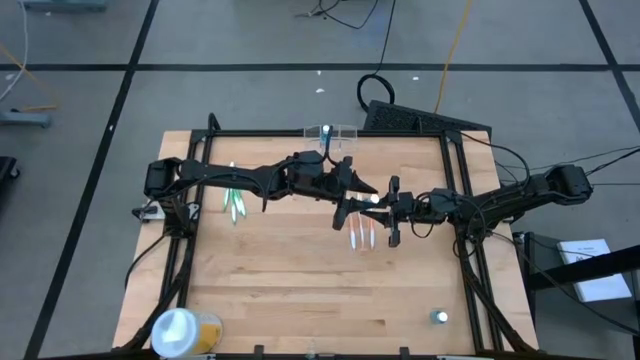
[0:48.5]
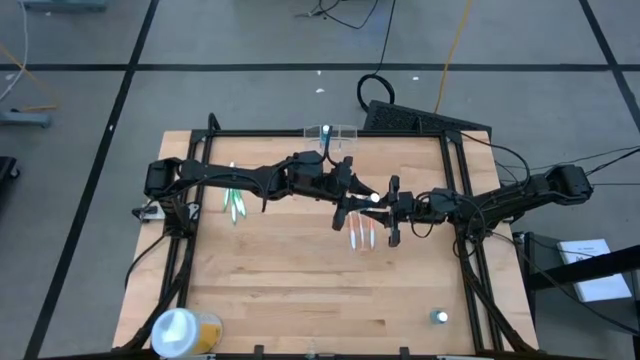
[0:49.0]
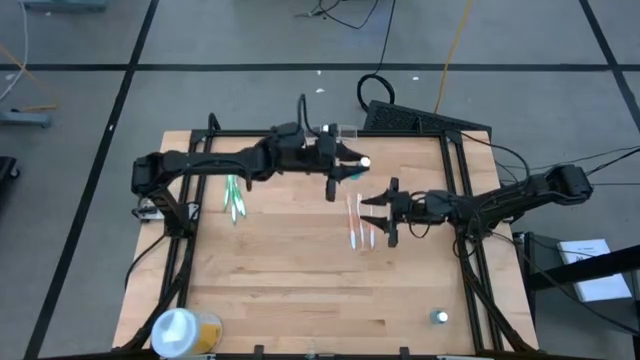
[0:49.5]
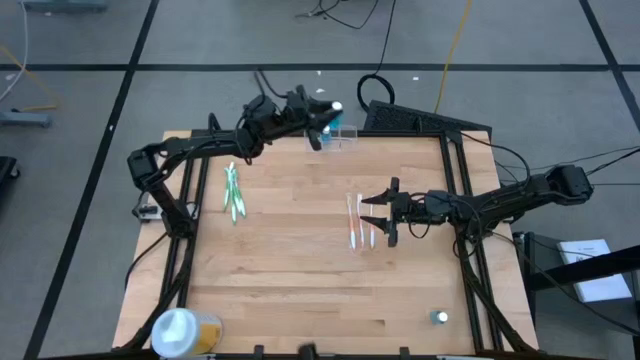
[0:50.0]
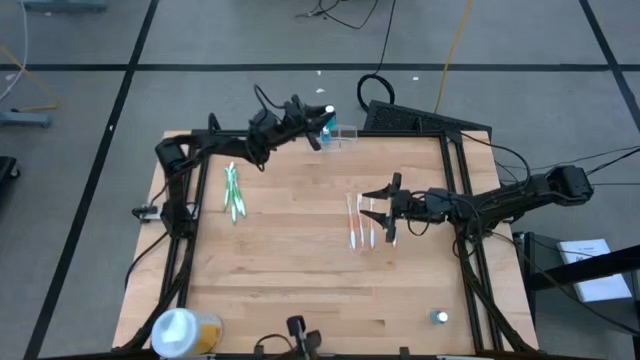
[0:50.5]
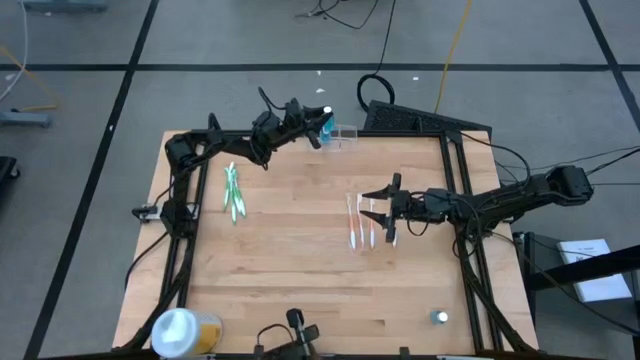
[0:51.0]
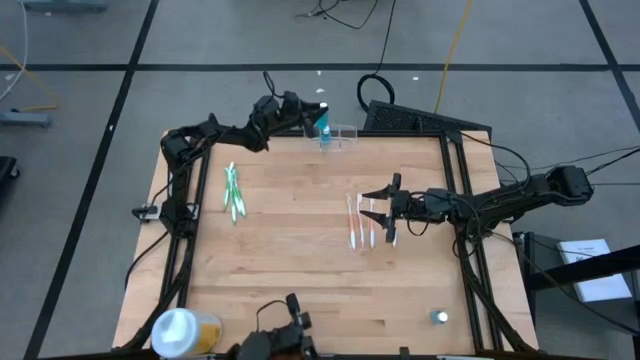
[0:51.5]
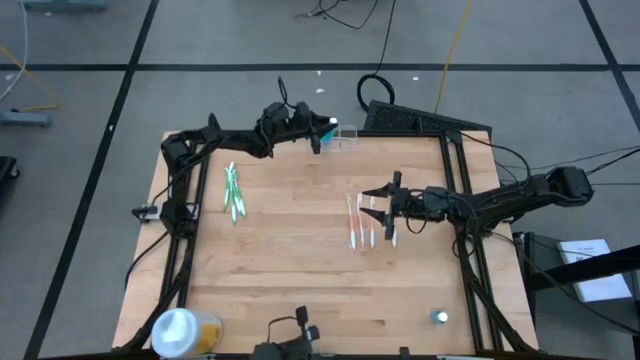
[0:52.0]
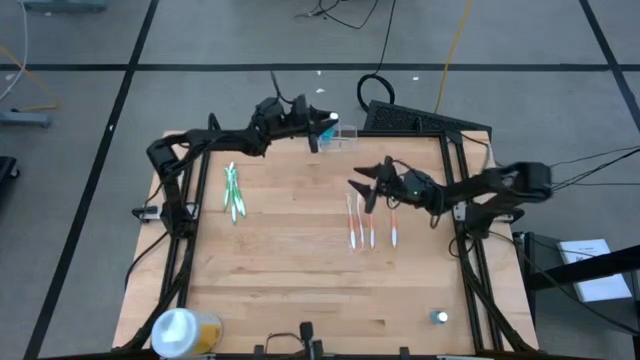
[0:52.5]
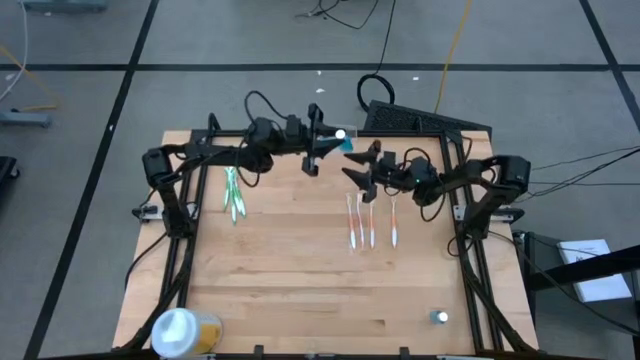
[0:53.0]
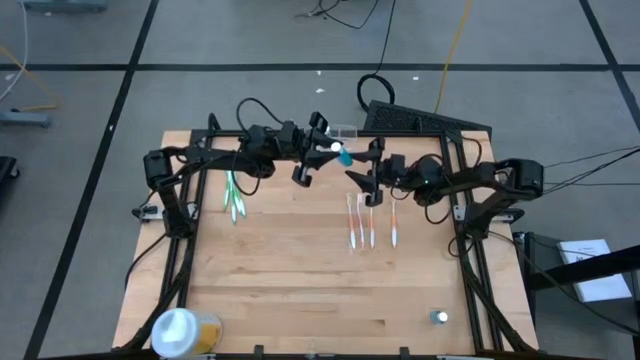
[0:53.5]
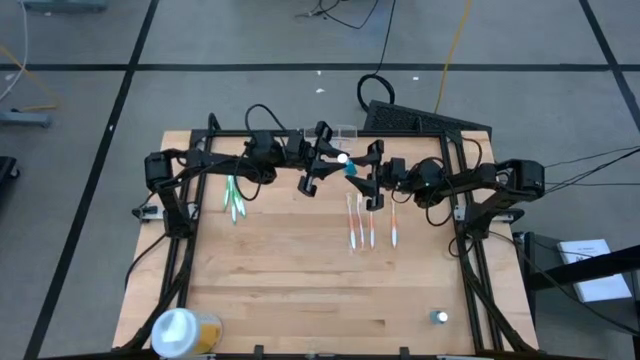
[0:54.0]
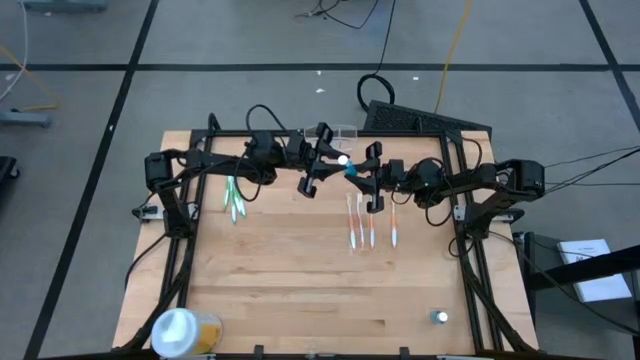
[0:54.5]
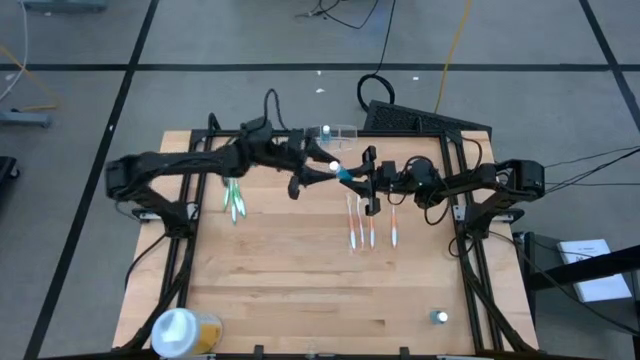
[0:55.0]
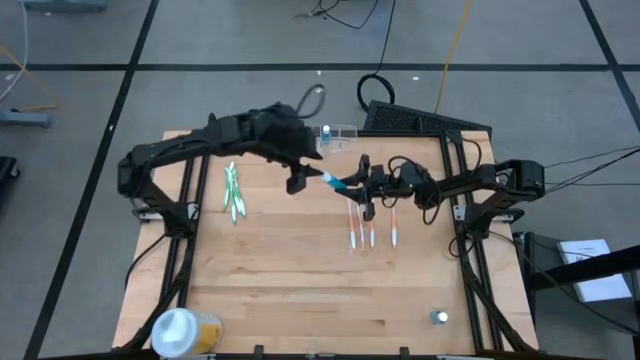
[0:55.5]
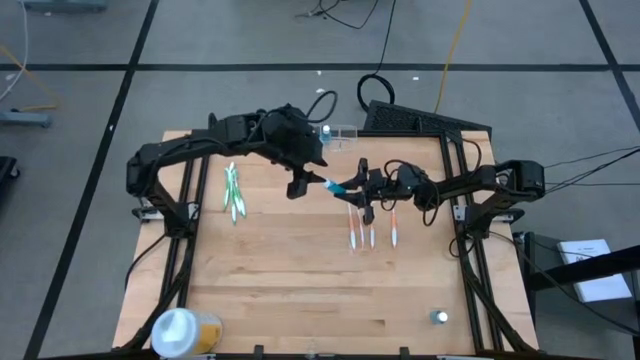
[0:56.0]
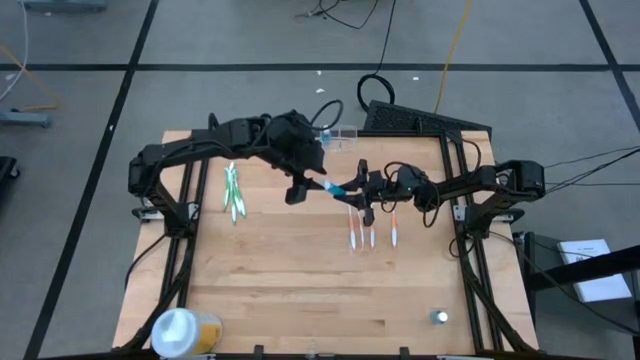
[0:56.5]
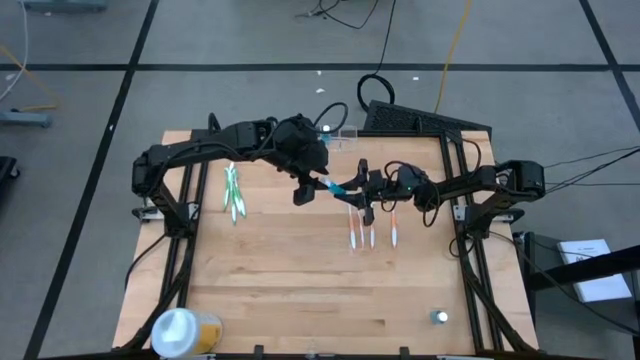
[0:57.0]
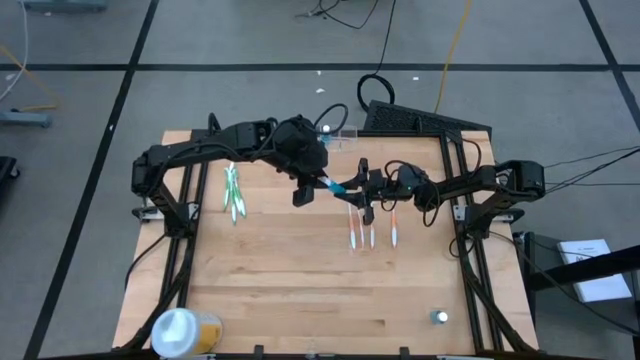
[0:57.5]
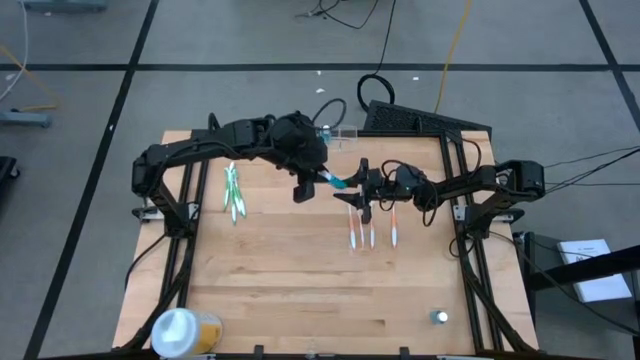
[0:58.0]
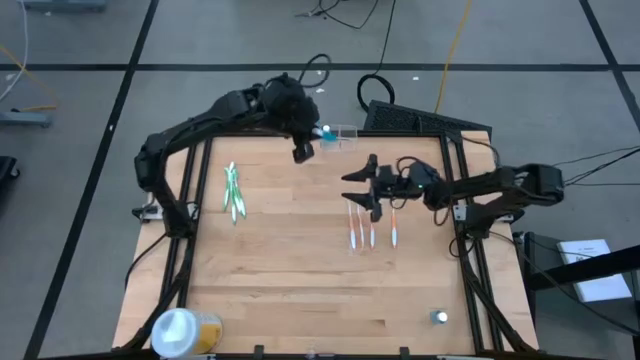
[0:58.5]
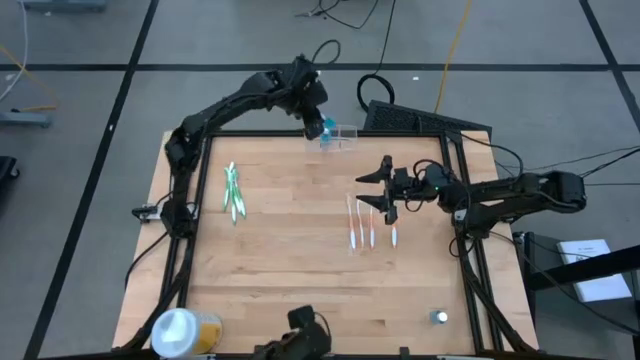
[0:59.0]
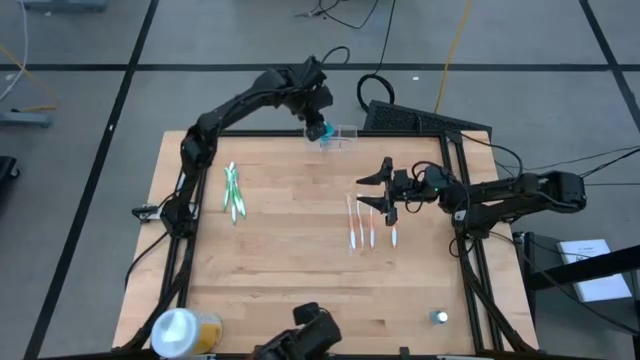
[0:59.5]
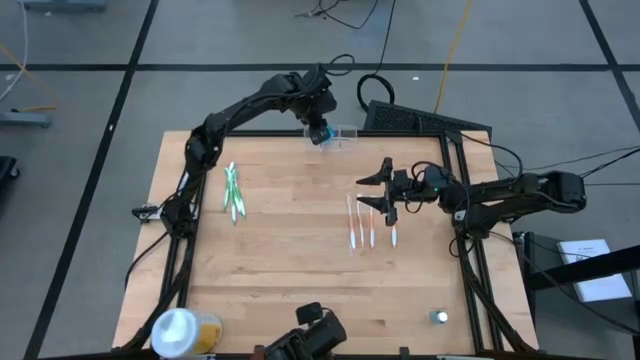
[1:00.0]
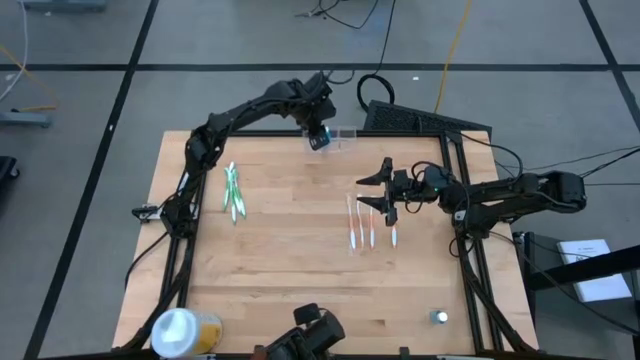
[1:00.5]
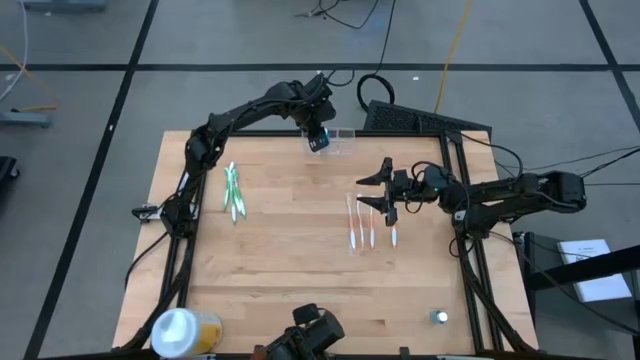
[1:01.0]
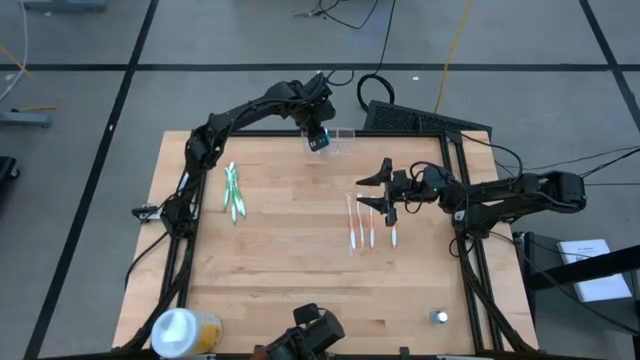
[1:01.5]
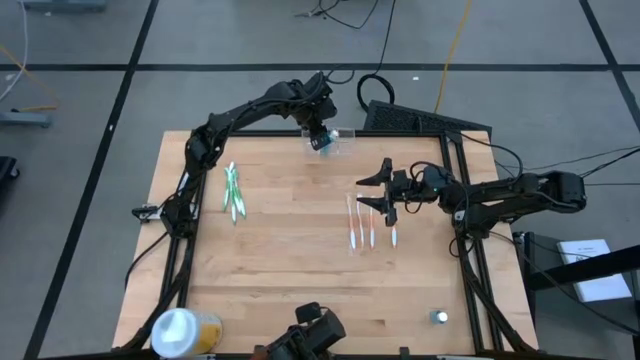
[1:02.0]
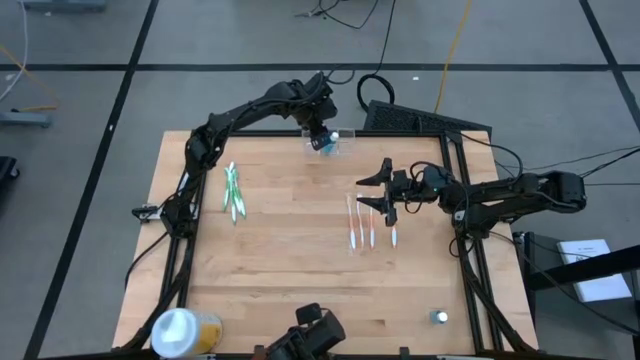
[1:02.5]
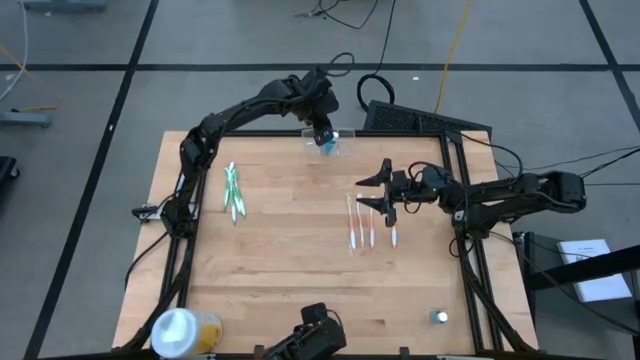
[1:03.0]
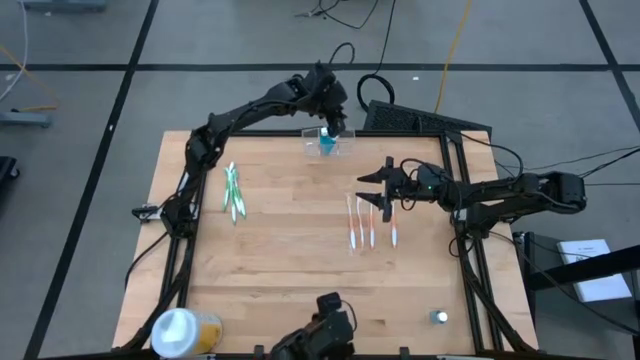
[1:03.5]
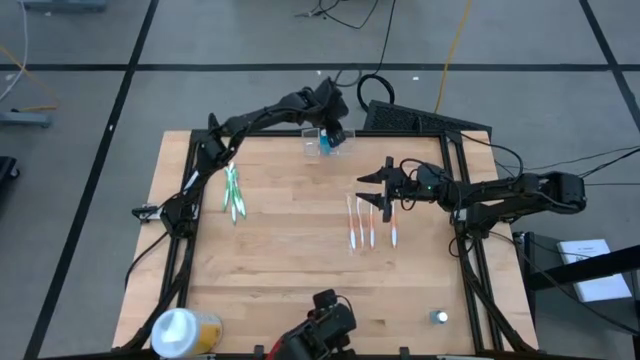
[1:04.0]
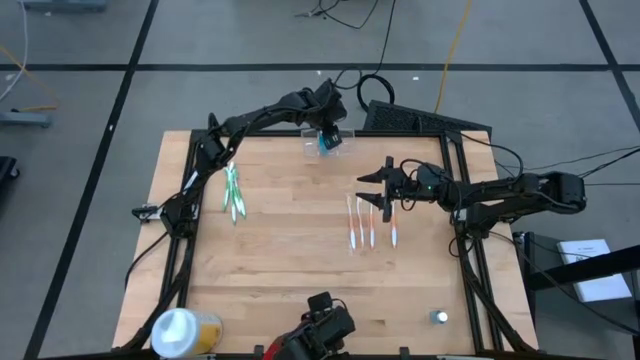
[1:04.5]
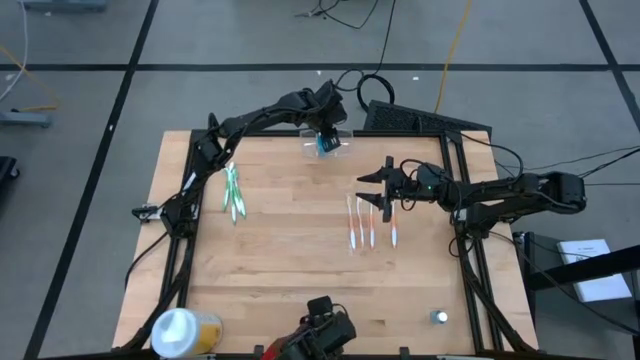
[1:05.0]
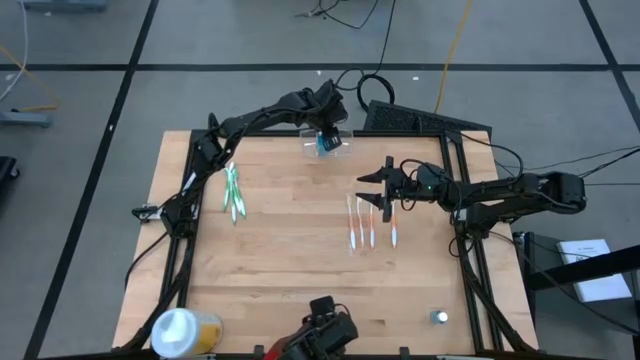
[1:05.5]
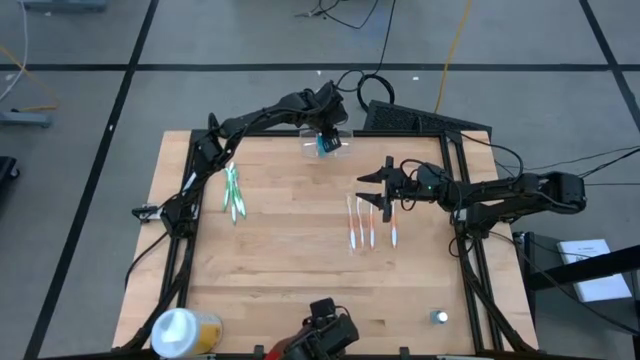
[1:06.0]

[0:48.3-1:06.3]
Task: Pick & Place toothbrushing station
Put the blue mouthwash into the transparent organizer

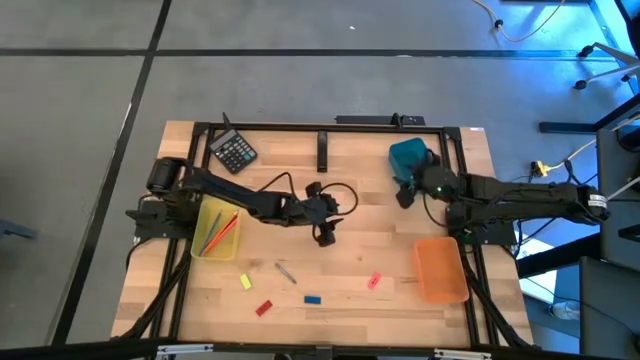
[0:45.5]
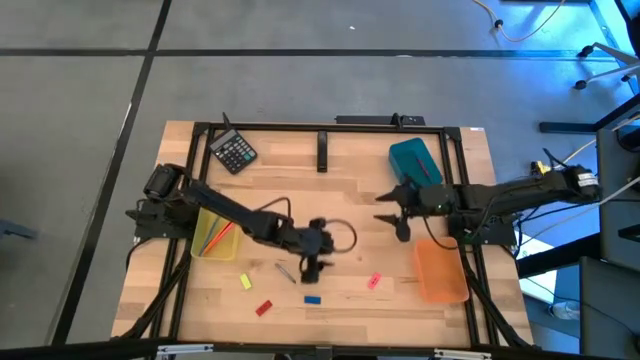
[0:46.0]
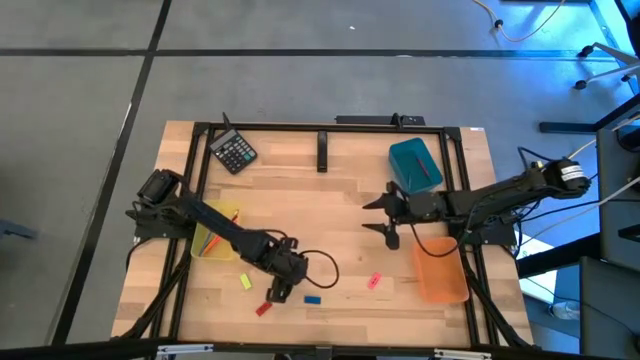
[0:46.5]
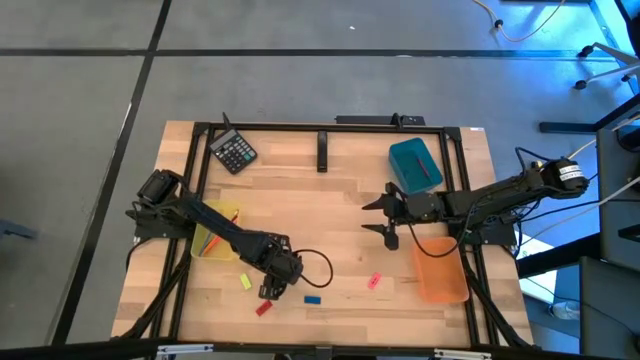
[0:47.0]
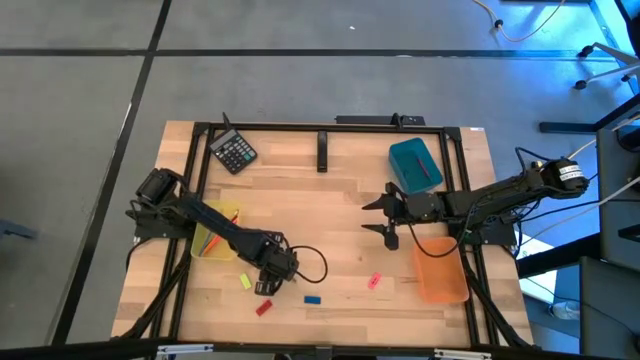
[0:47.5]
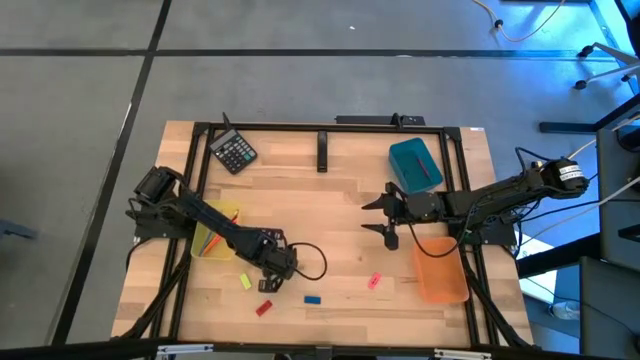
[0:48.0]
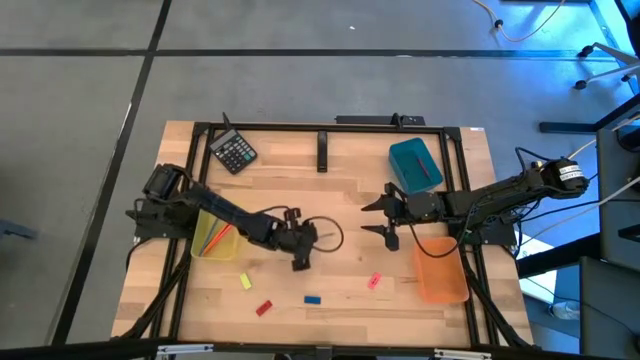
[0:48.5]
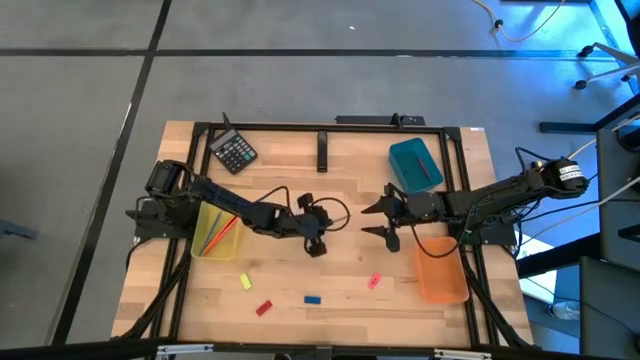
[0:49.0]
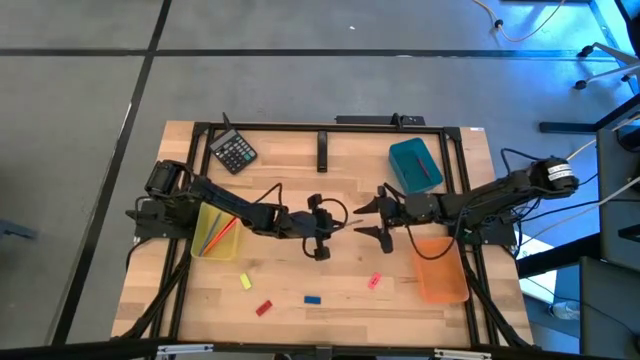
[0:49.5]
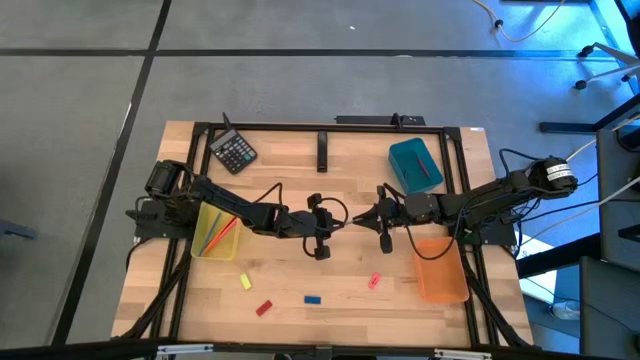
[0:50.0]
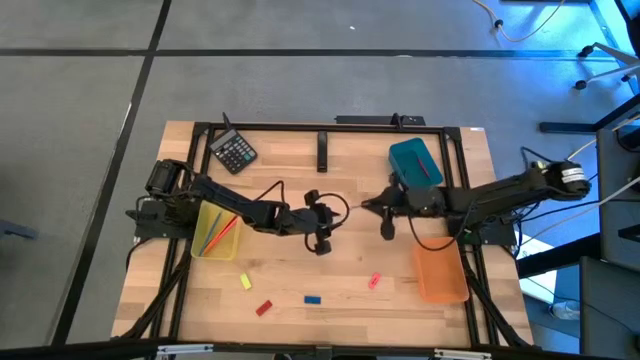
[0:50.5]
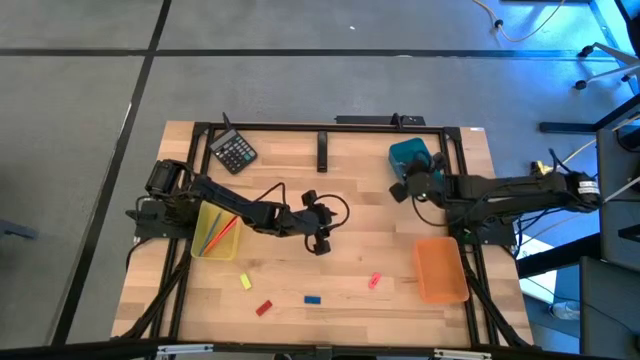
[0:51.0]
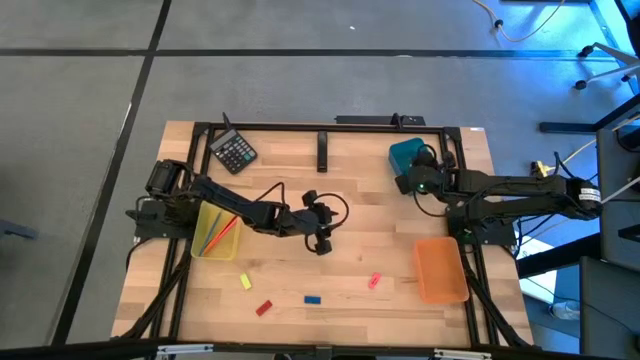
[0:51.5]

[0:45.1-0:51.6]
Task: Sort crayons/erasers/pens/pencils in bins
Put the gray crayon into the blue bin
